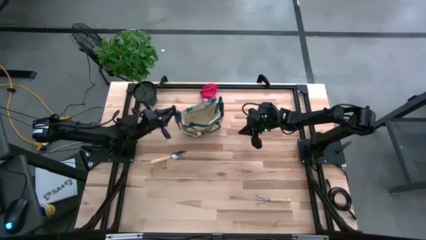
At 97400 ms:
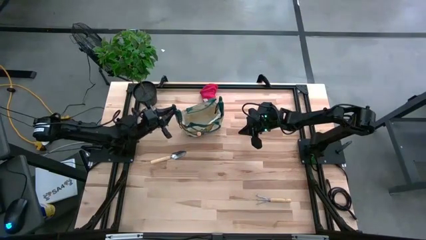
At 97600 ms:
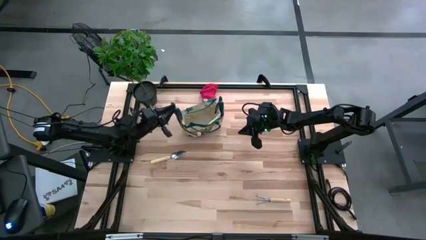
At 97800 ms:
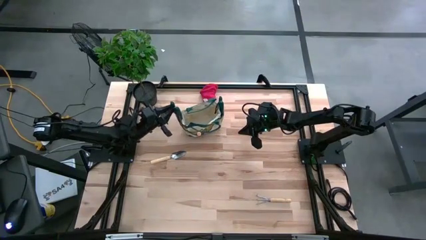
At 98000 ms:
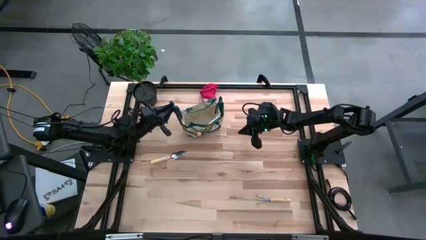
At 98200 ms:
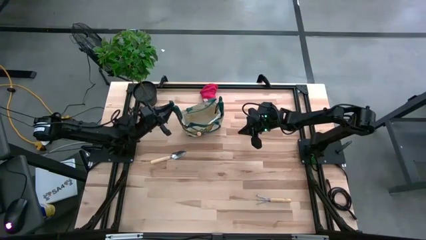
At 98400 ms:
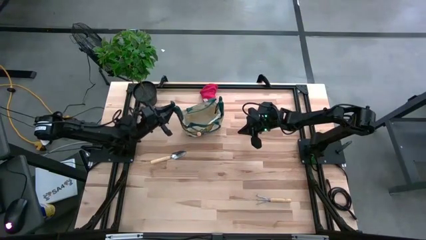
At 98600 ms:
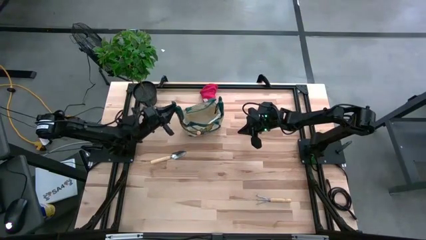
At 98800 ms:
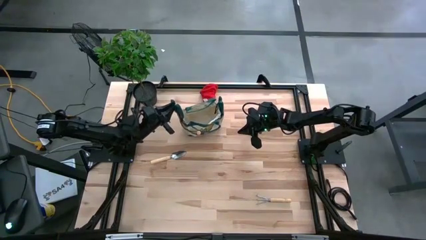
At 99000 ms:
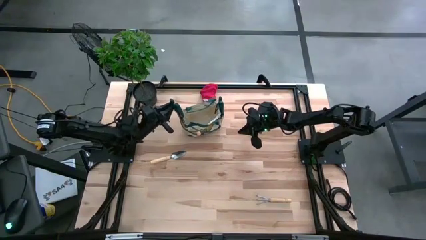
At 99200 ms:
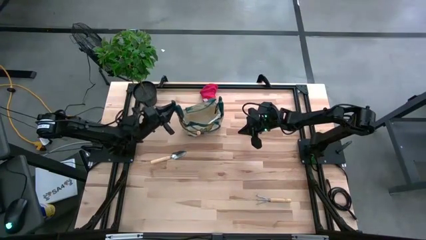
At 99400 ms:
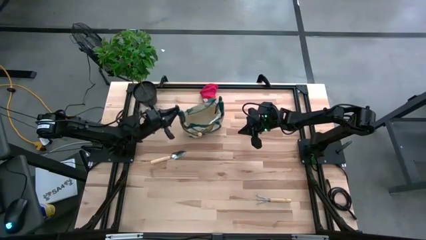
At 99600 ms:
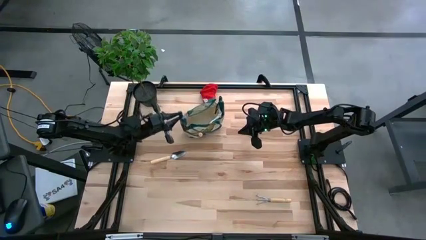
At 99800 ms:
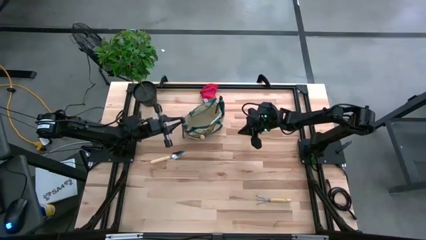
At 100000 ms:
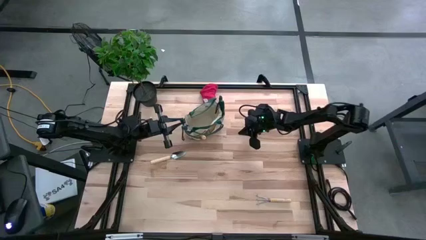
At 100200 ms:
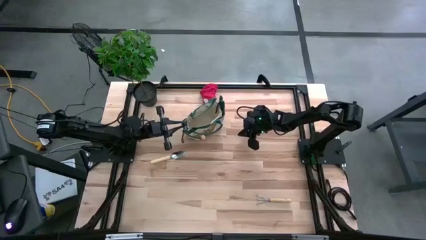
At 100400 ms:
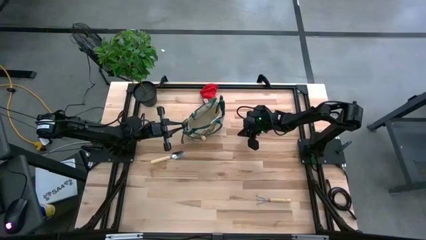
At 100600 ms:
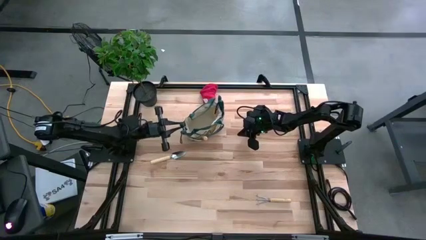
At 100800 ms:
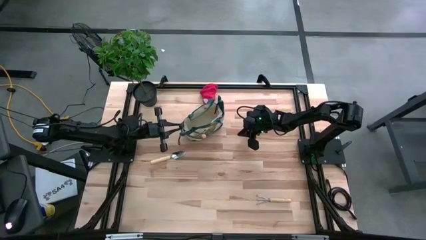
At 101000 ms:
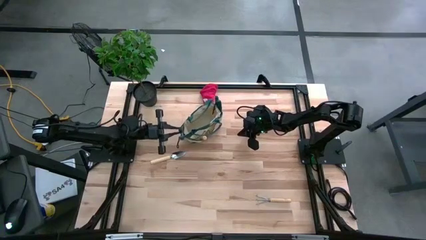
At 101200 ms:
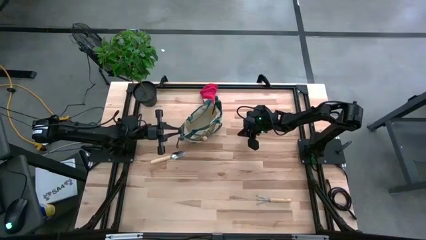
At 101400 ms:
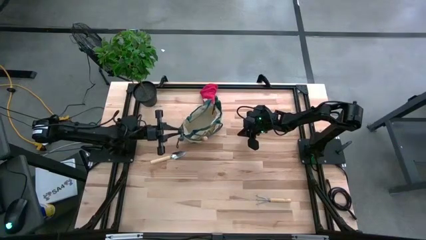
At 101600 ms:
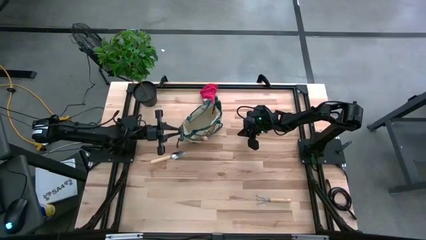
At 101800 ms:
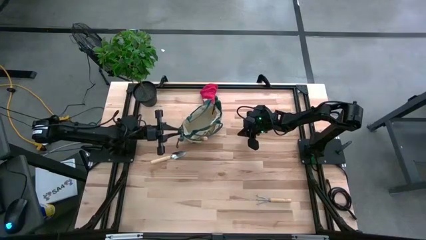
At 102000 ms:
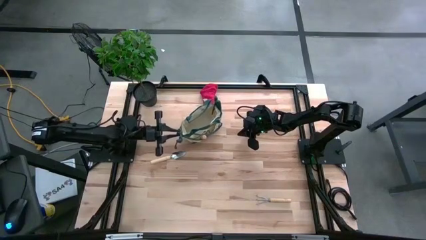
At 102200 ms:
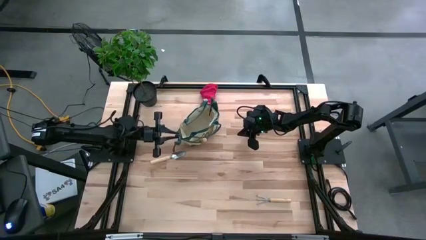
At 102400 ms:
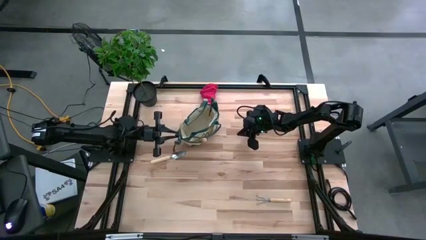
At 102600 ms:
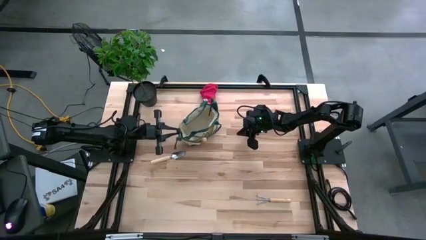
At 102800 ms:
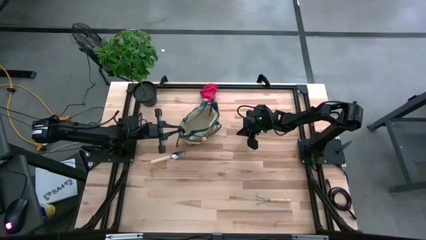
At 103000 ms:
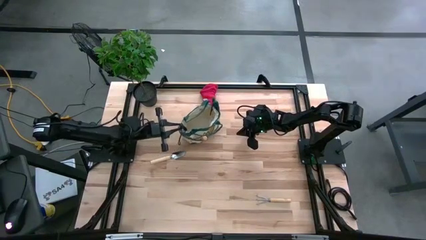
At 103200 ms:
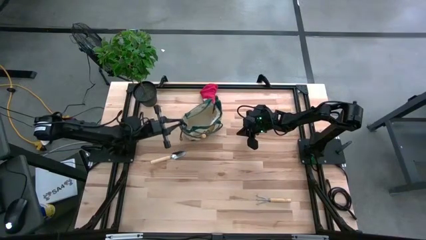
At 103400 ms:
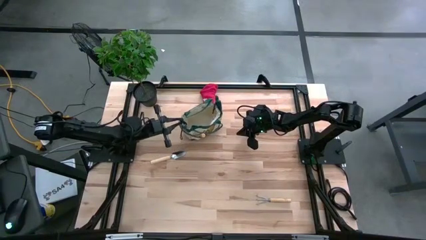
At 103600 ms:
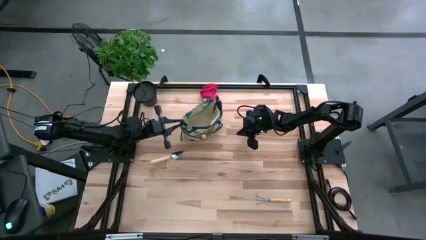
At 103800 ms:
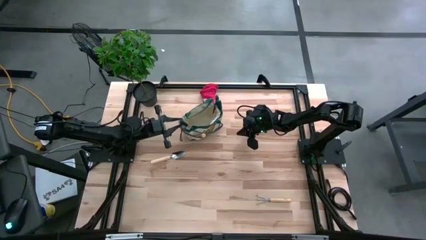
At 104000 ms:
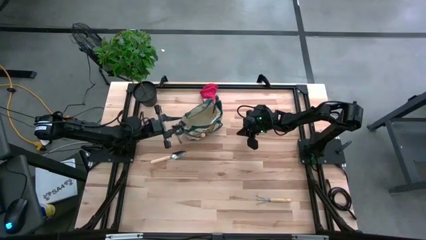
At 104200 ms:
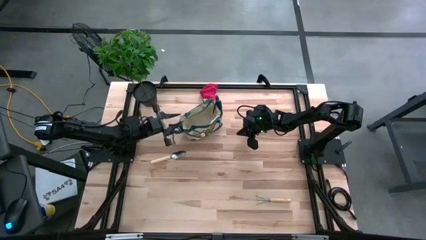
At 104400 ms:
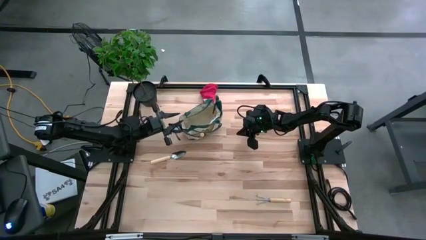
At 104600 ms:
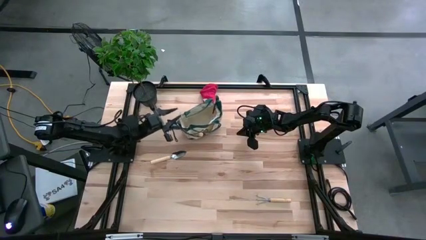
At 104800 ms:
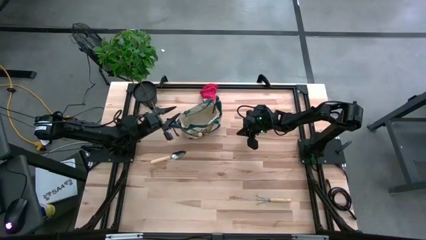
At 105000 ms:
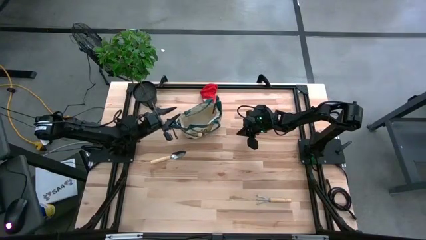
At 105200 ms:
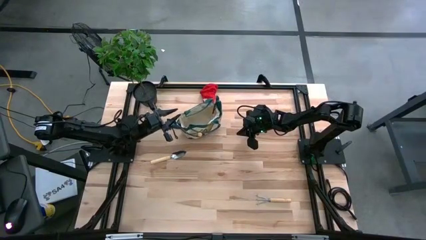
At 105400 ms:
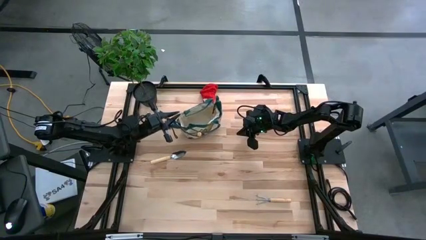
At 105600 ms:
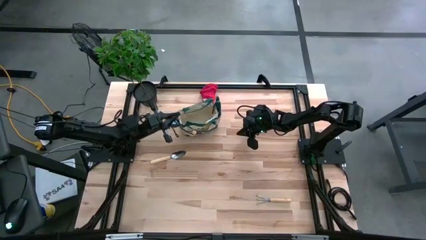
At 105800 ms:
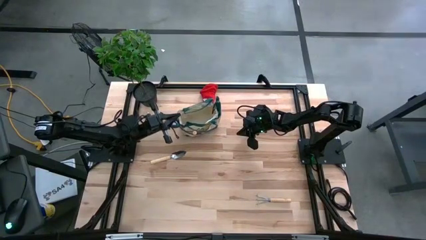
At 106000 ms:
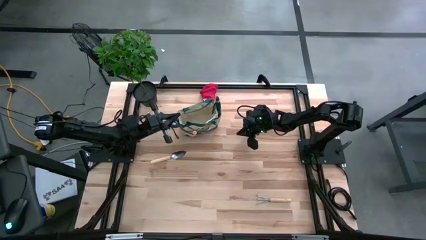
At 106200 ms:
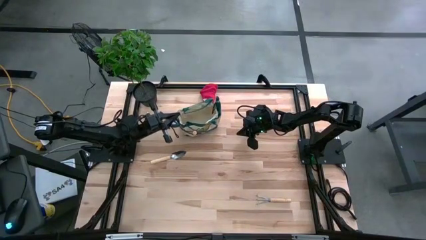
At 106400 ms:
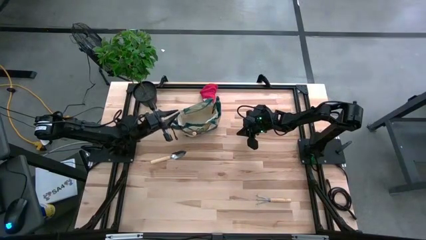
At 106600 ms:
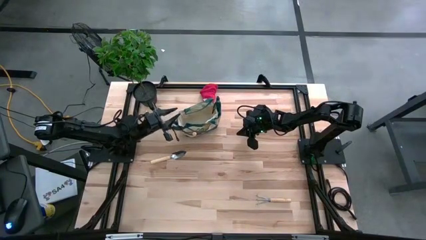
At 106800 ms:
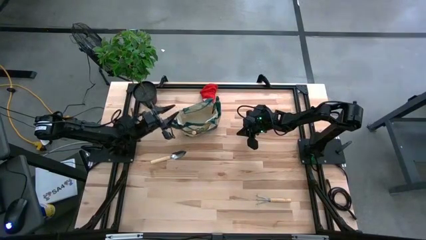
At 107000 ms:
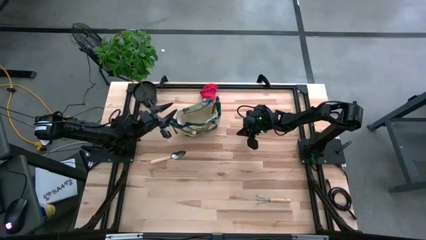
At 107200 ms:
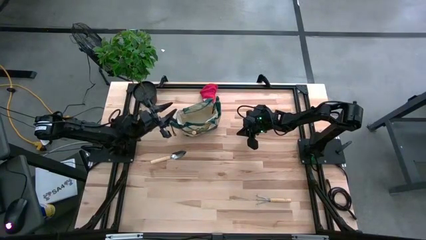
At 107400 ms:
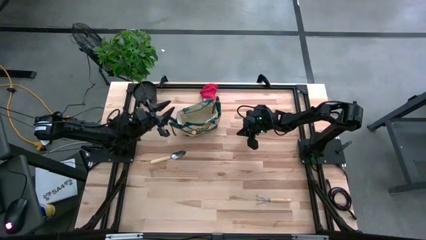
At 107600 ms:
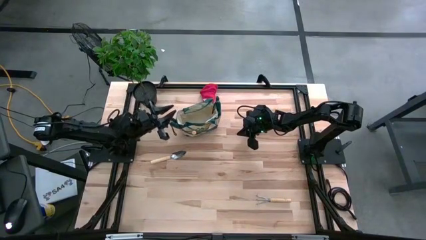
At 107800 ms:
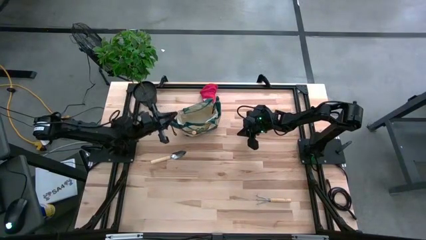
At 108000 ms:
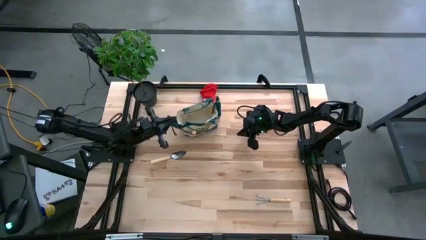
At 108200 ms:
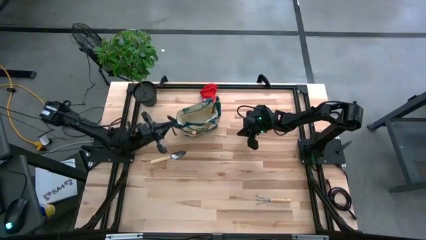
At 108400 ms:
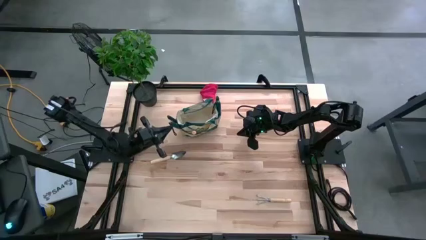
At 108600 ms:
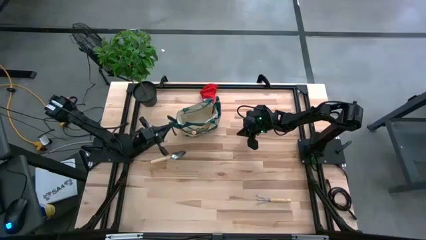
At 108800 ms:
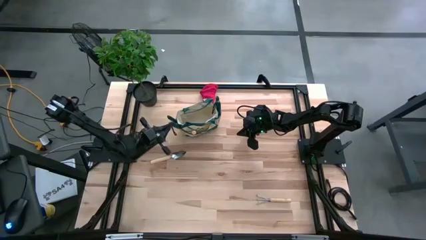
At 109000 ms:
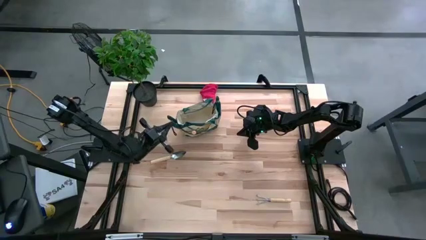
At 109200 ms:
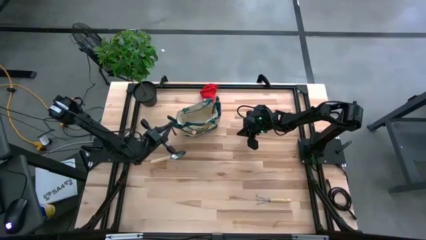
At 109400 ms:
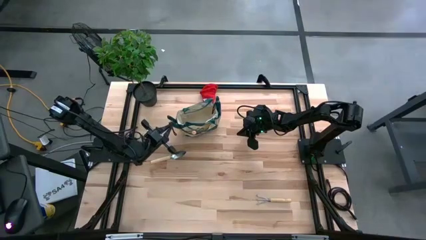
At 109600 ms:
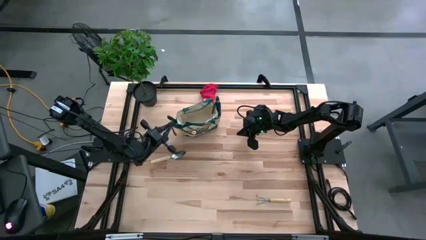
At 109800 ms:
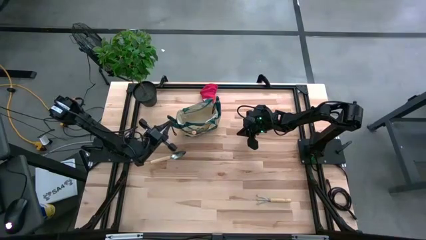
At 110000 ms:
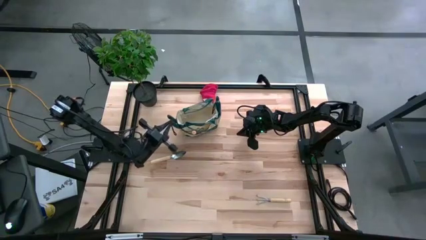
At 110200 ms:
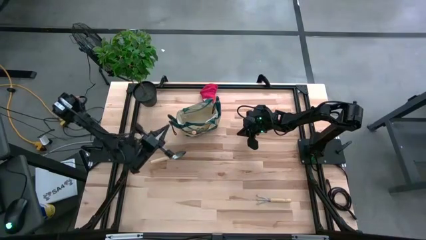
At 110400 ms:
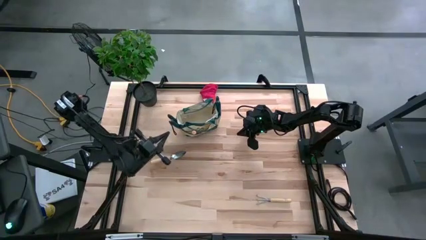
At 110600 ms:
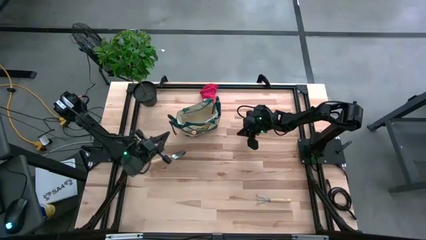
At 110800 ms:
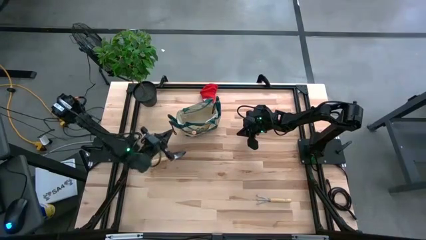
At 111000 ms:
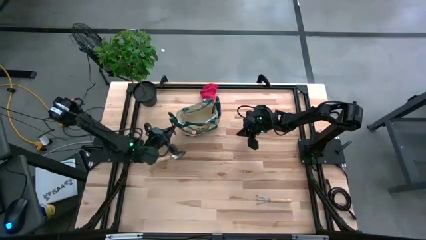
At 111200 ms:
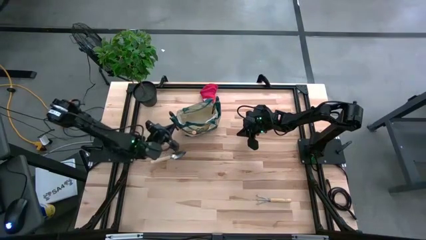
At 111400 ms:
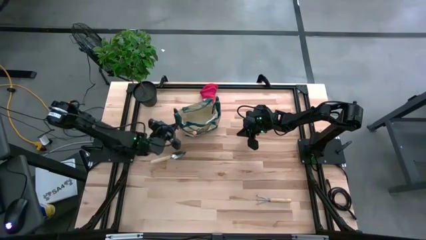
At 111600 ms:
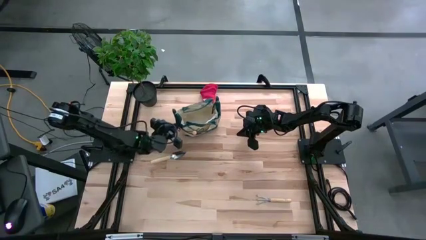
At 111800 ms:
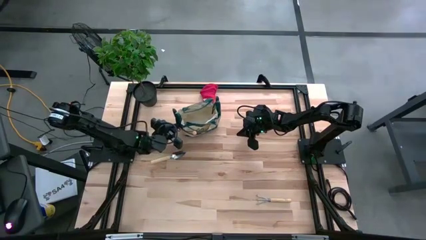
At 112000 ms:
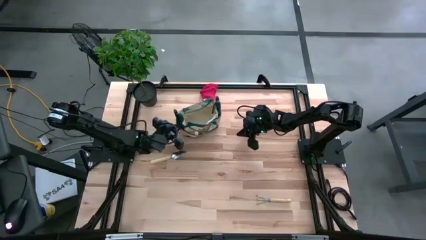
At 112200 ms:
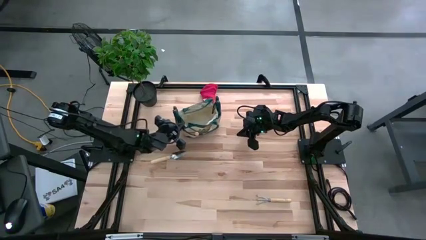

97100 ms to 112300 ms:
Task: Pick & Place Garden tools in Gardening bag
Put the shear scissor into the gardening bag
